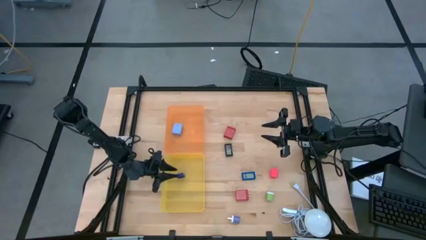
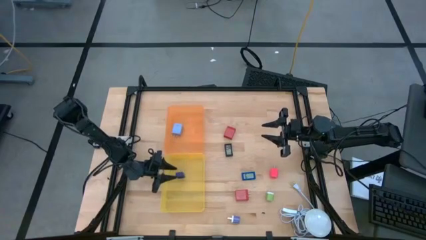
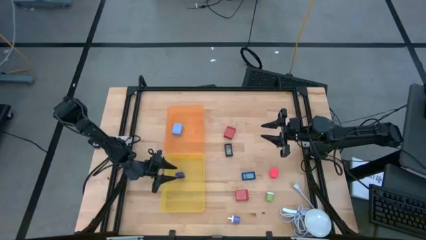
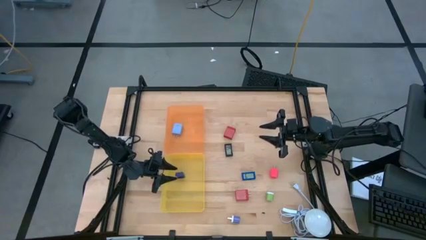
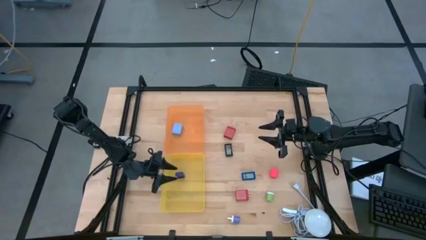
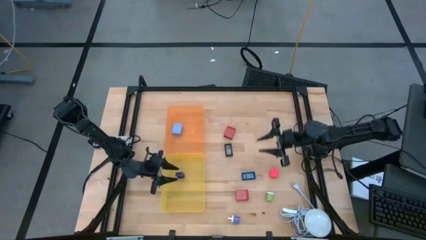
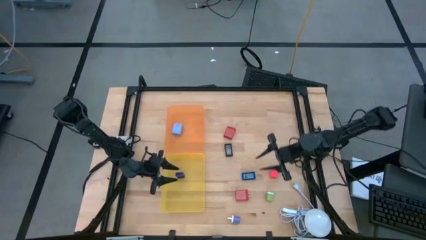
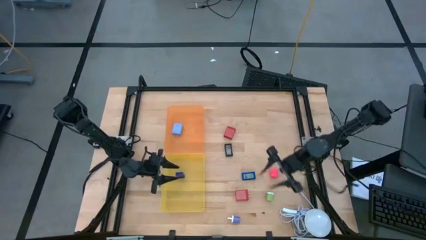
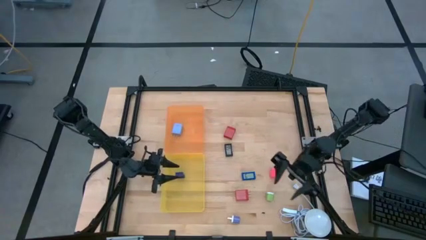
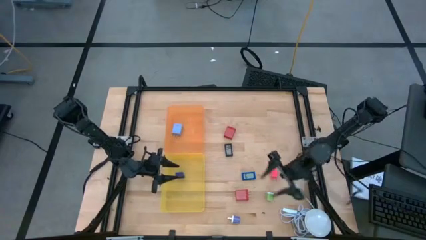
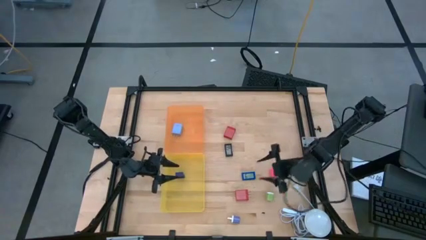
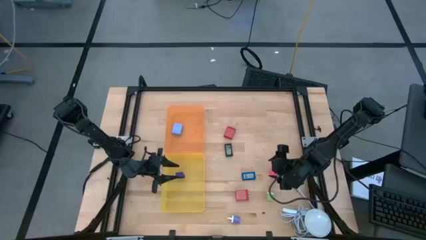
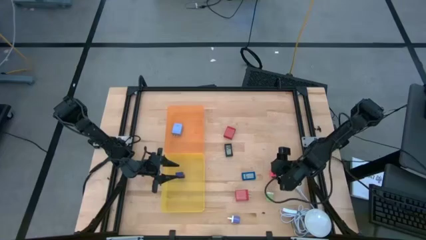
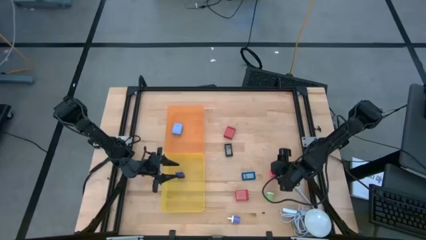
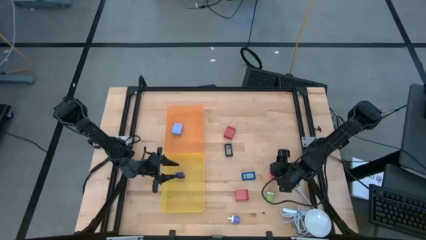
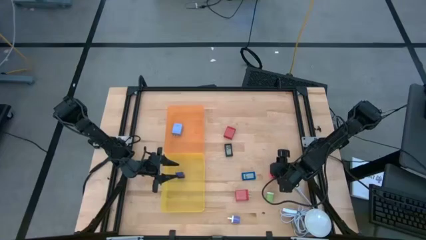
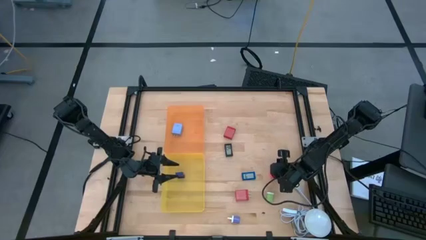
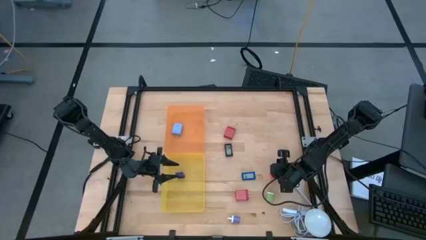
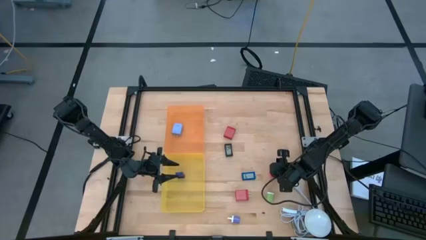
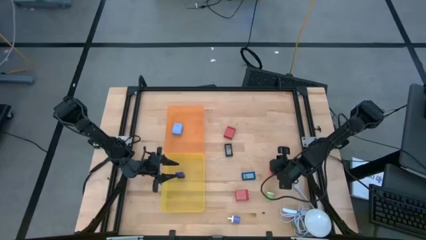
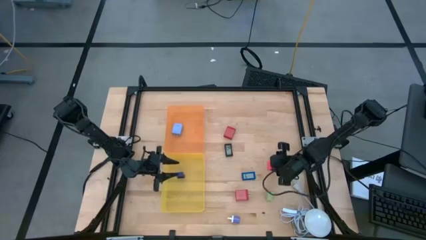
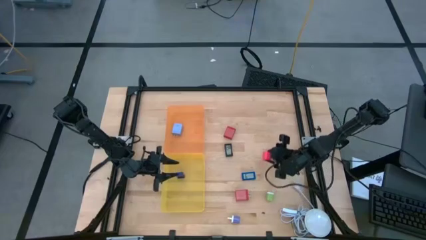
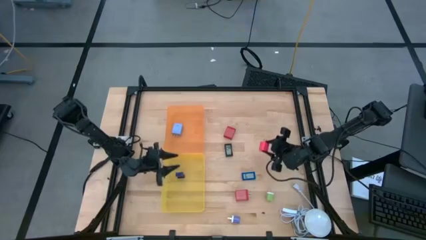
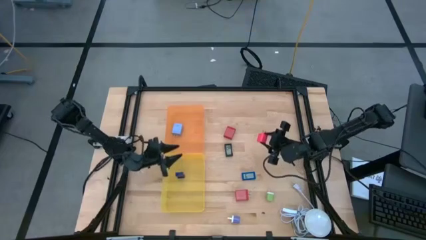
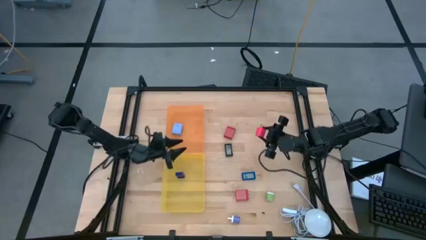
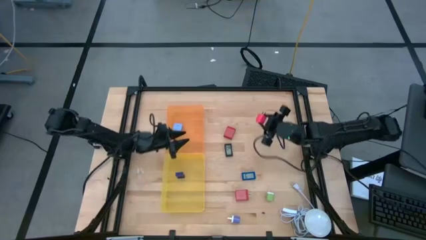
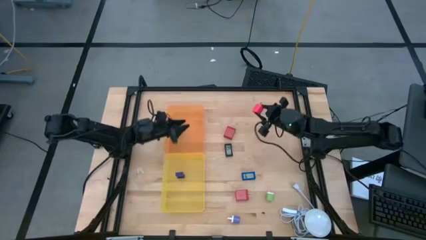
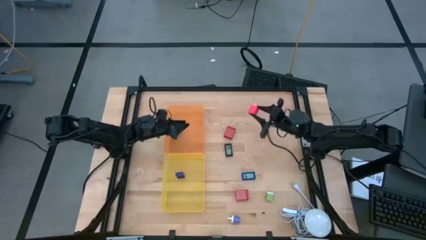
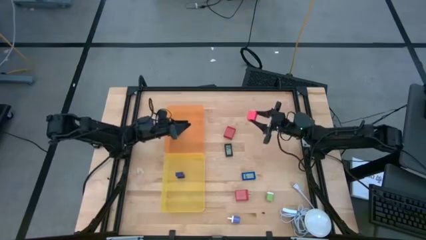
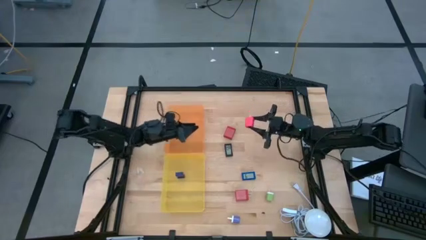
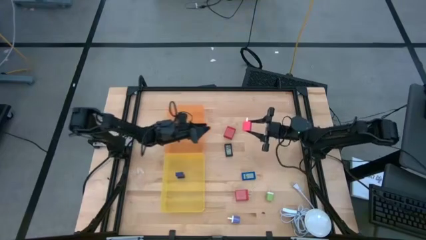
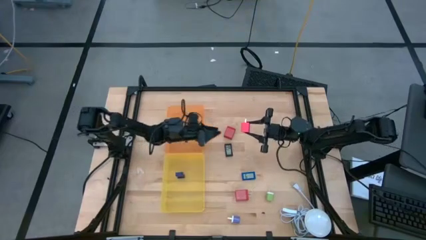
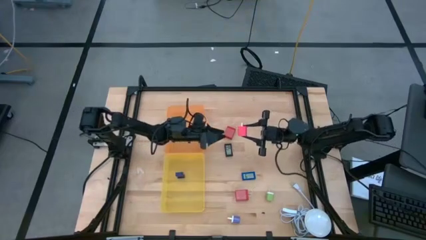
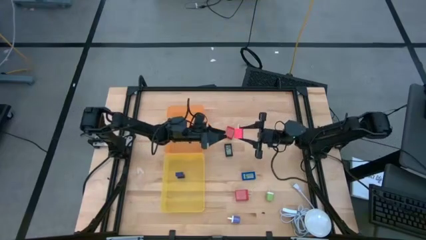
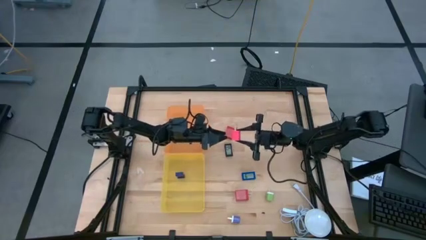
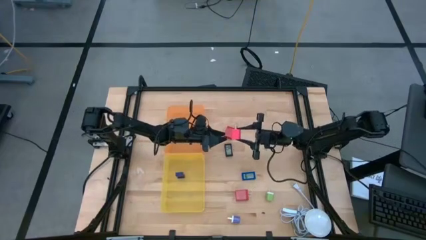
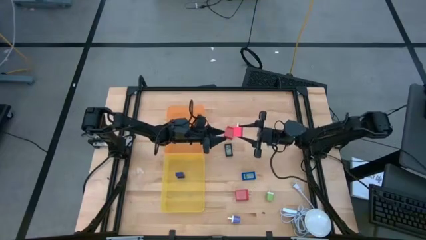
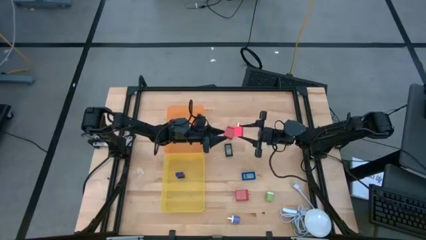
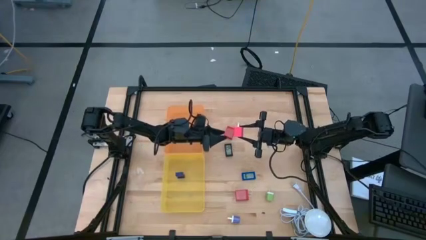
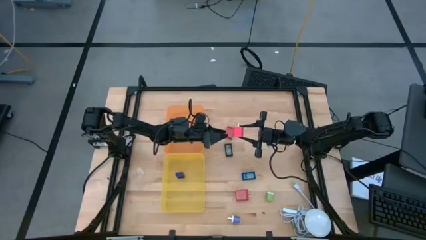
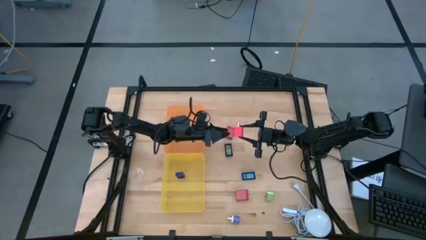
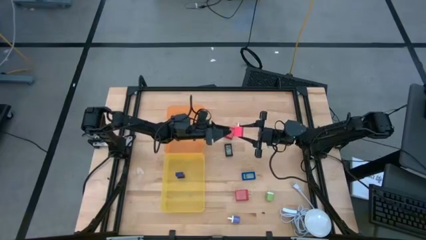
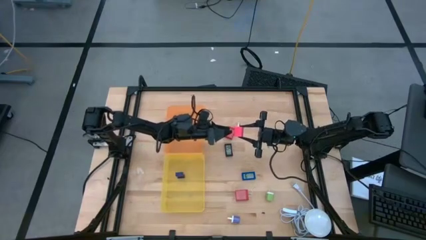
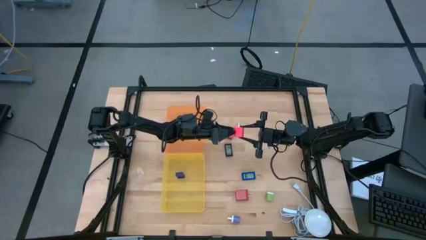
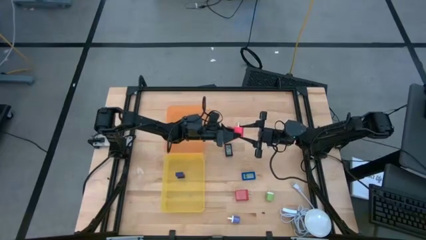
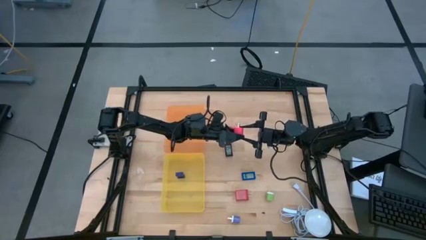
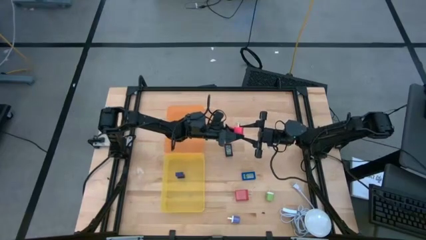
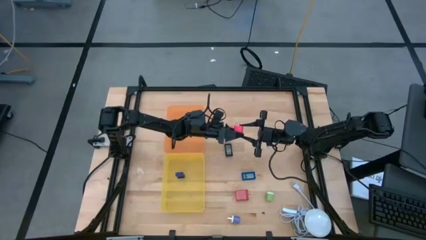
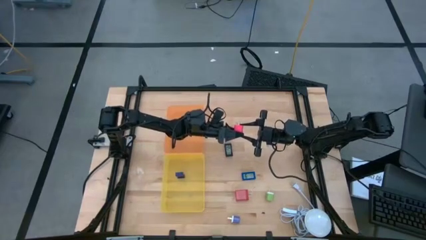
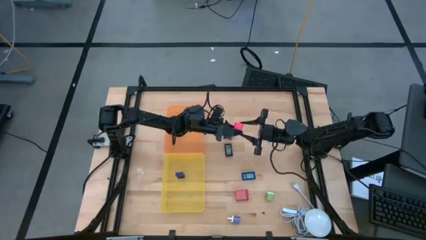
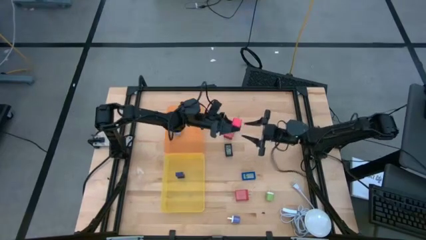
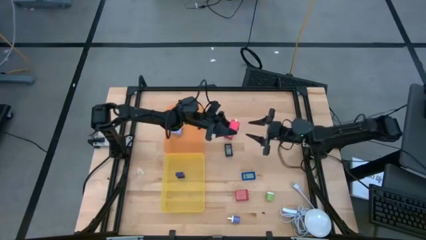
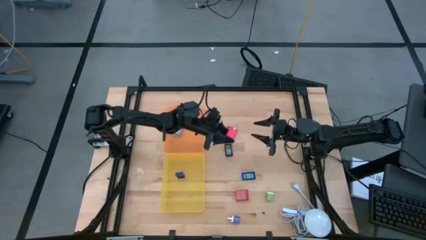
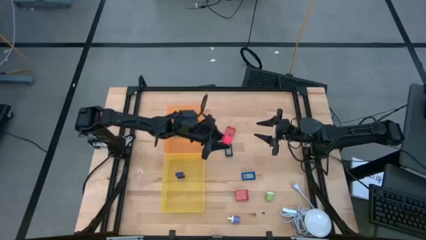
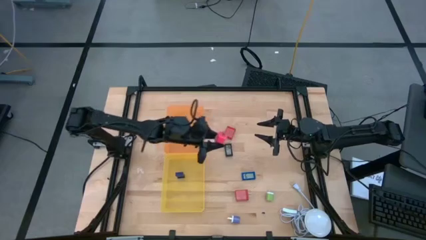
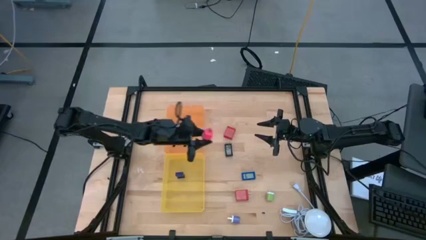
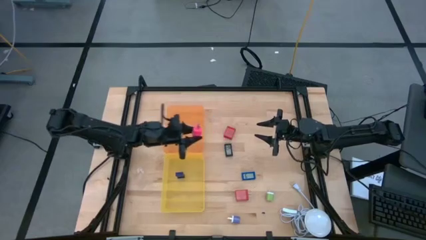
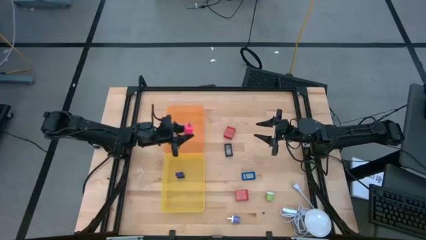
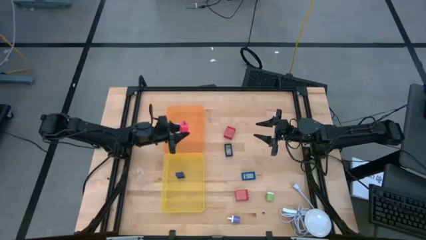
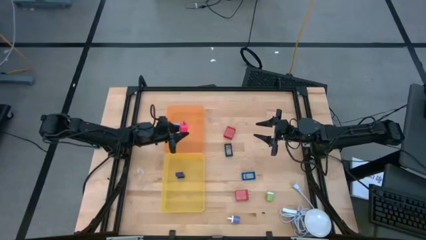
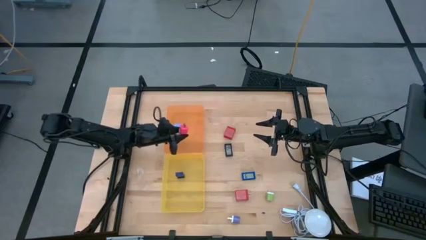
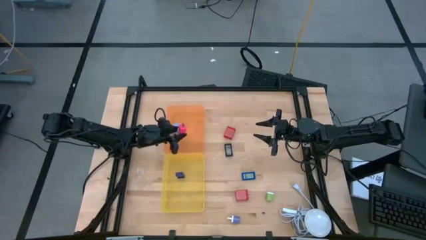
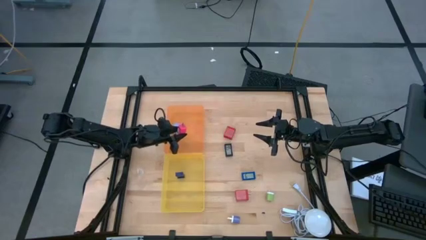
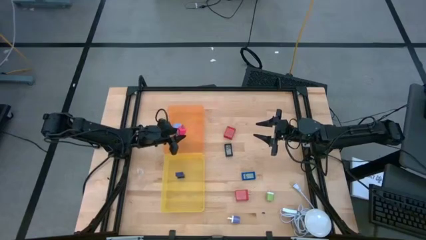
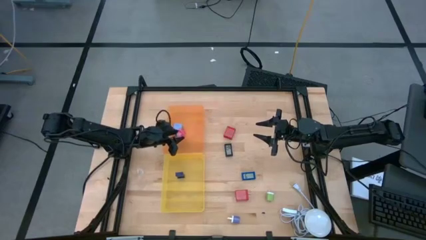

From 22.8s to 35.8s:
Task: Sort adapters and digital timers
Put the pink adapter into the orange bin
